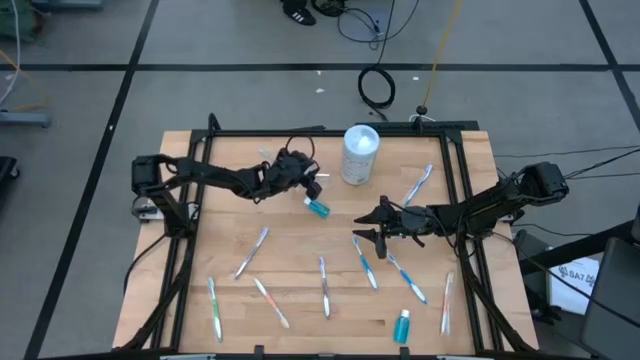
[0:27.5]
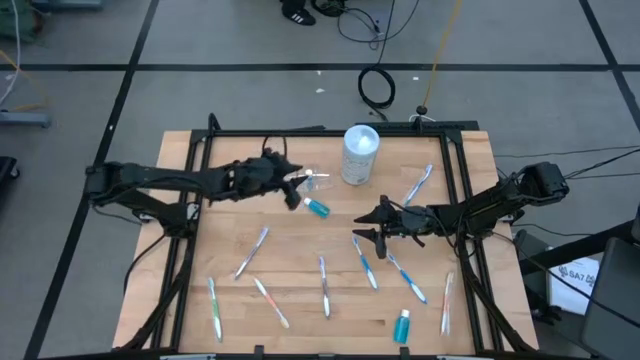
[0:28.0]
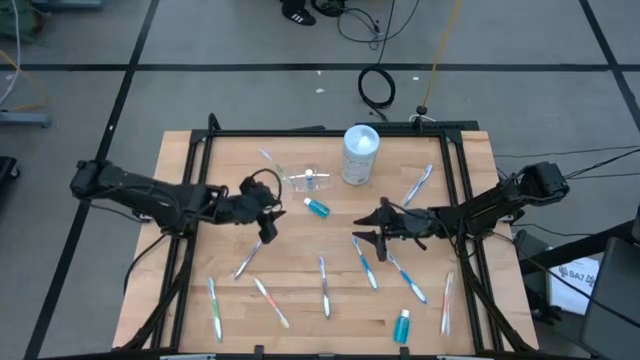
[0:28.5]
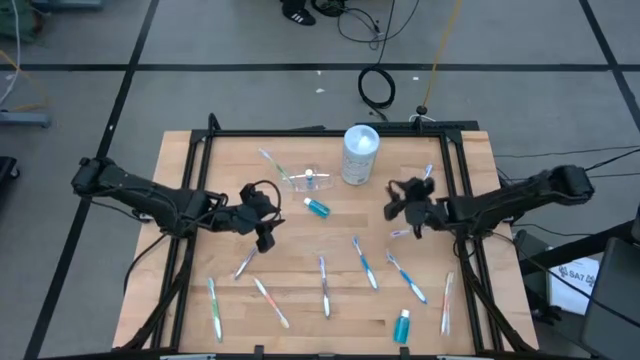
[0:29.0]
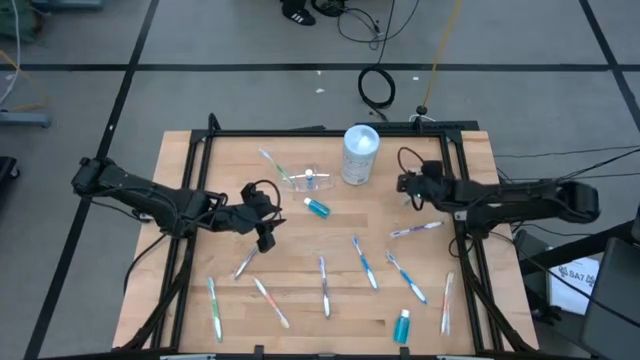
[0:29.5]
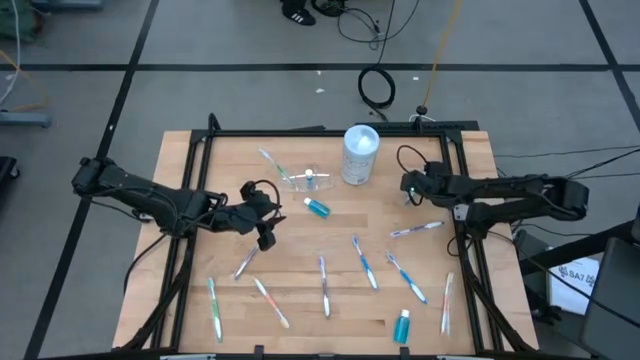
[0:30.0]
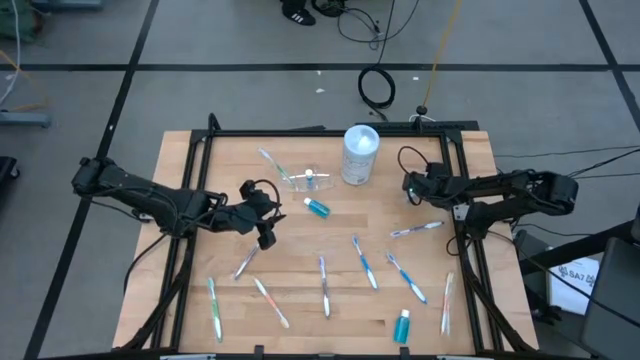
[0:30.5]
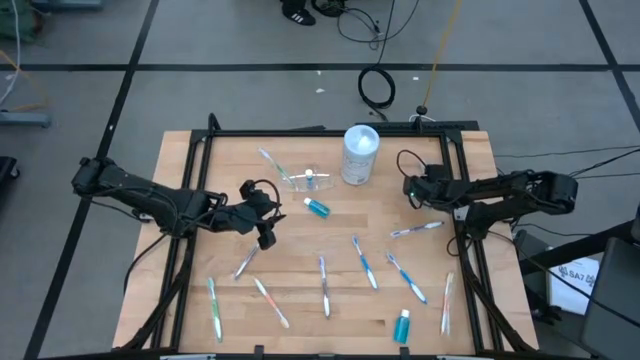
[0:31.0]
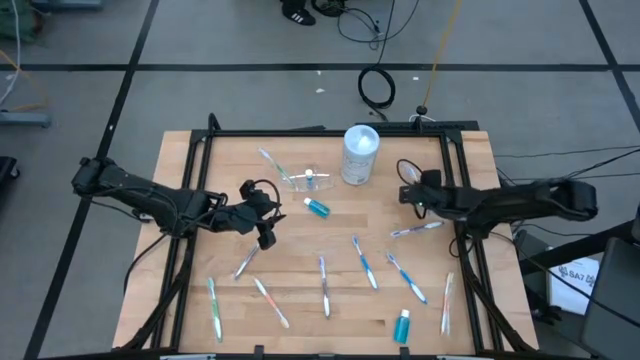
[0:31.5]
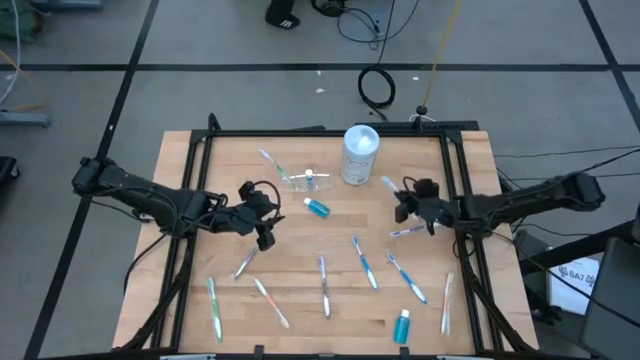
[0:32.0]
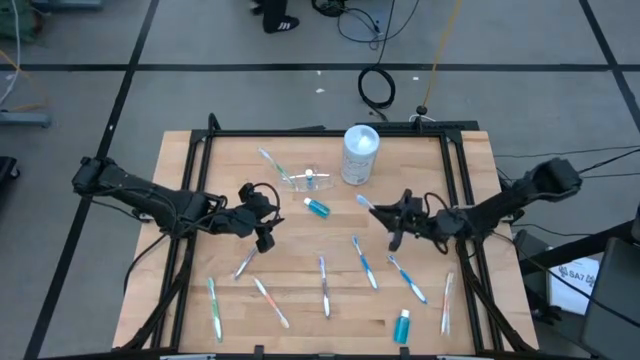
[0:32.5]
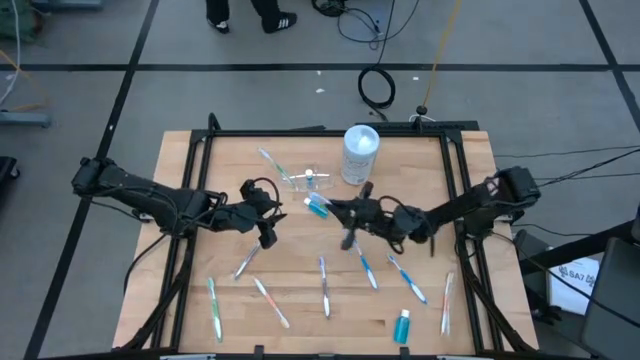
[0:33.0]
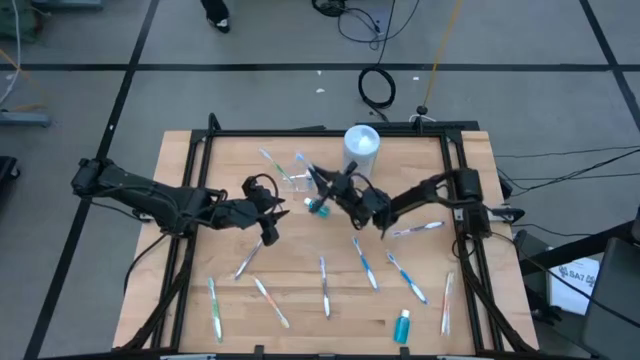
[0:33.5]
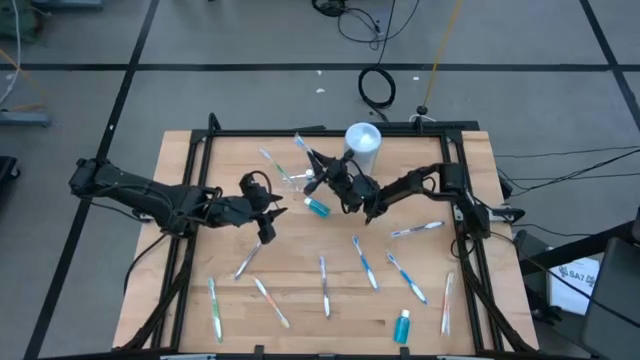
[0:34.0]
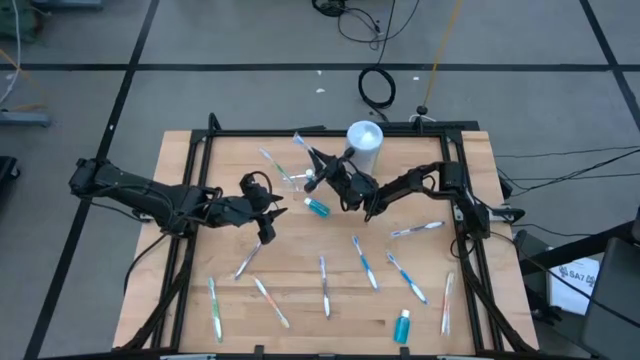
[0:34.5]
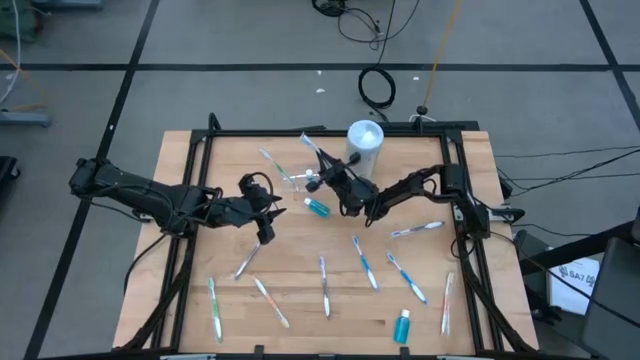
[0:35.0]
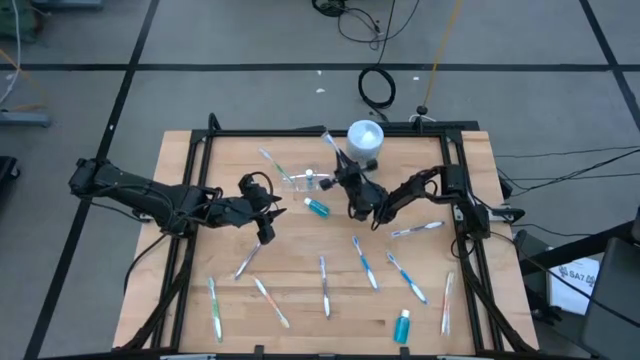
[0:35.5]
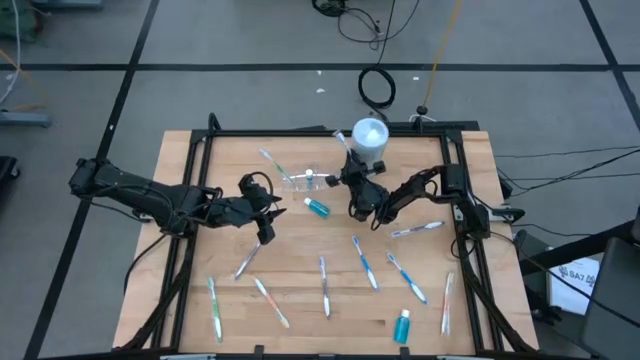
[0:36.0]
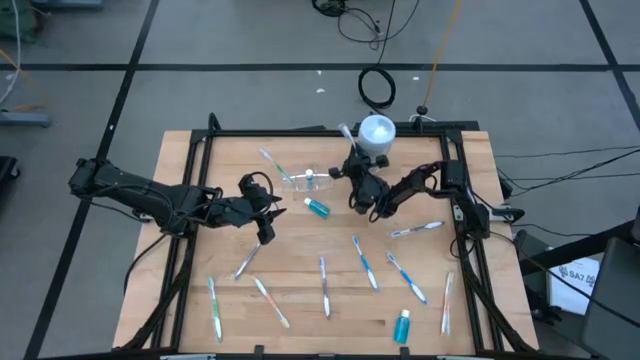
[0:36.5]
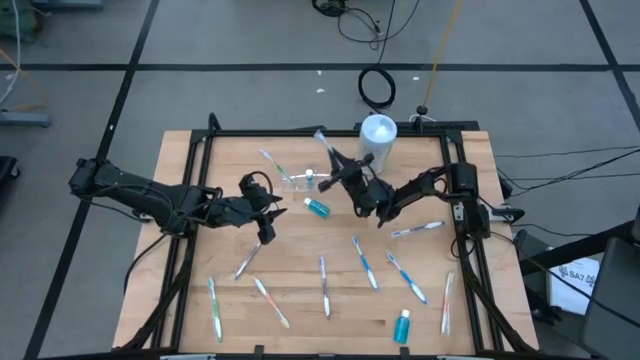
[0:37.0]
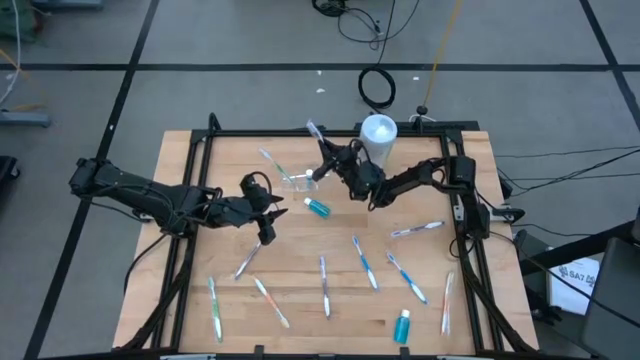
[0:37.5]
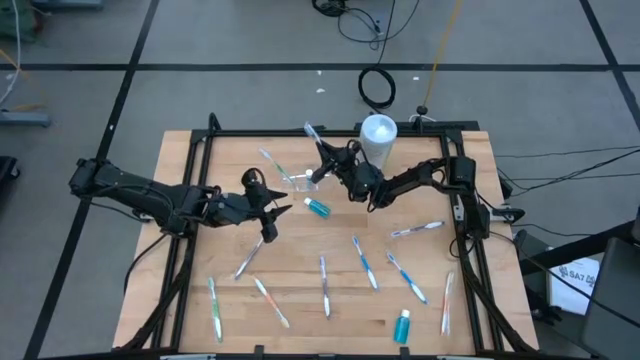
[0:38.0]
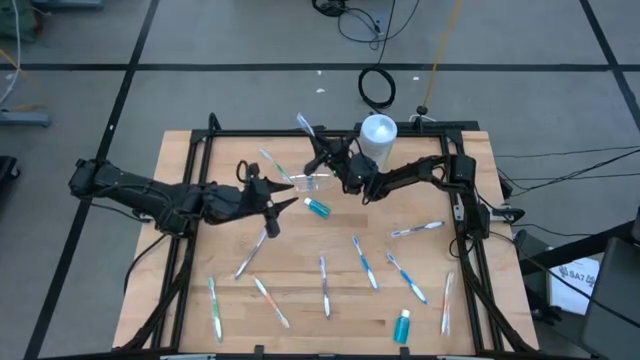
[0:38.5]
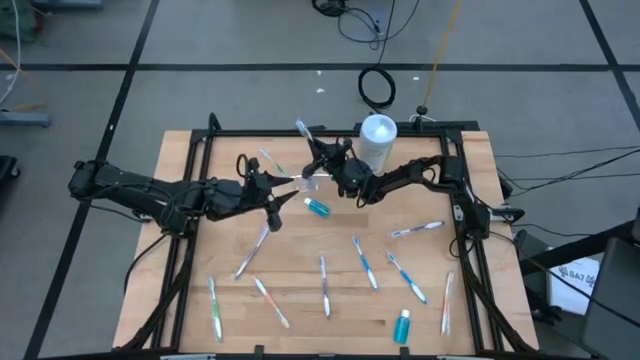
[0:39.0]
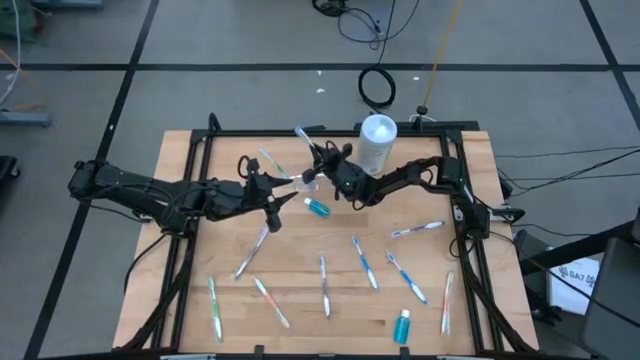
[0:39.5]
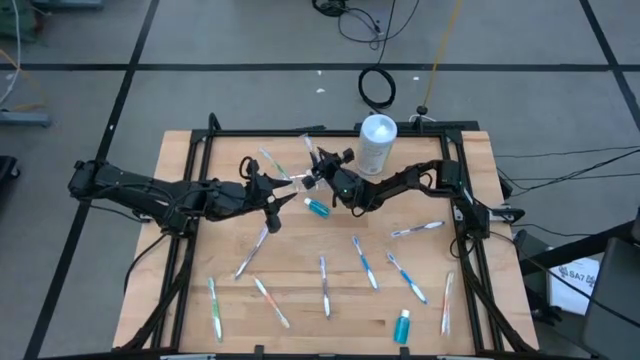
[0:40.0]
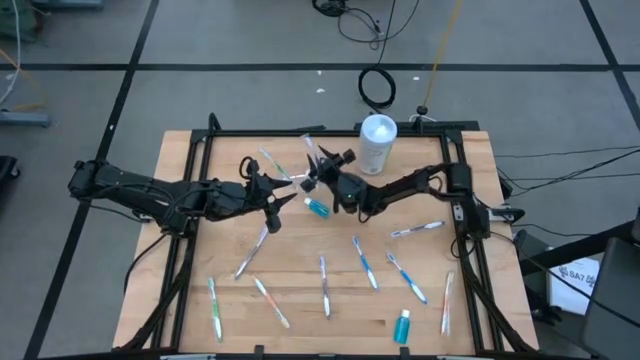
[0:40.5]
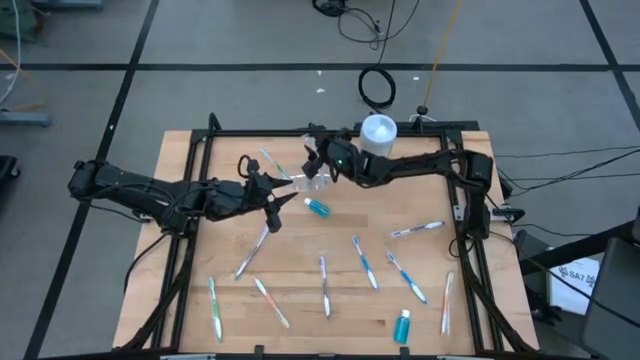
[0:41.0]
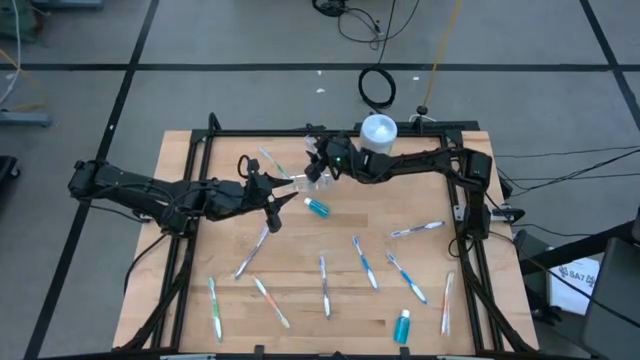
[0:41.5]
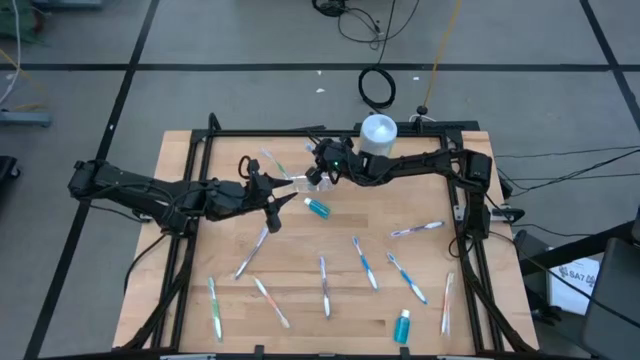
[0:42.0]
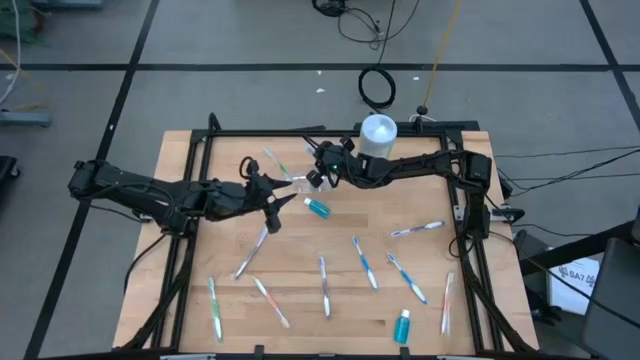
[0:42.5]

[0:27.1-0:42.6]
Task: Pick & Place toothbrushing station
Put the top blue toothbrush in the right compartment of the transparent organizer

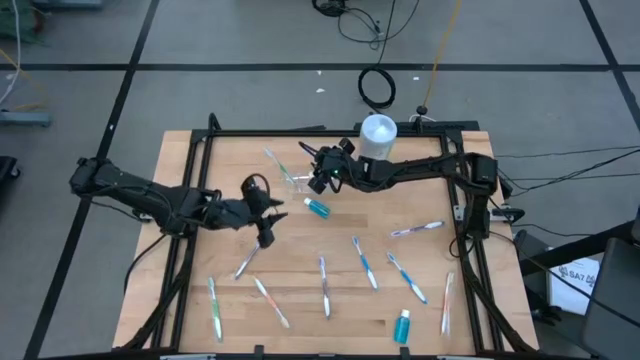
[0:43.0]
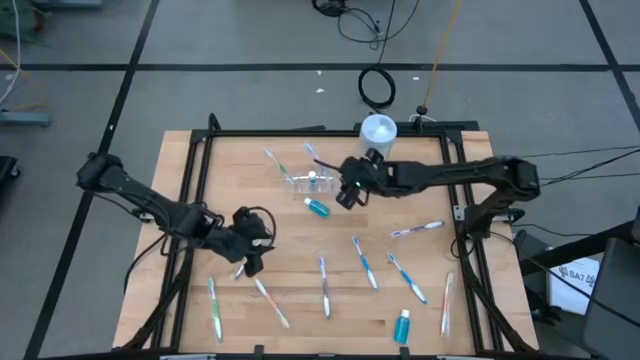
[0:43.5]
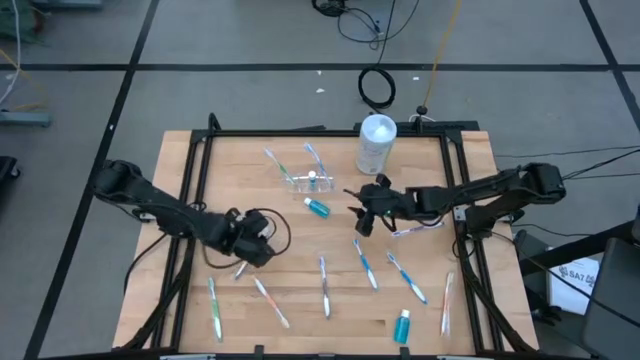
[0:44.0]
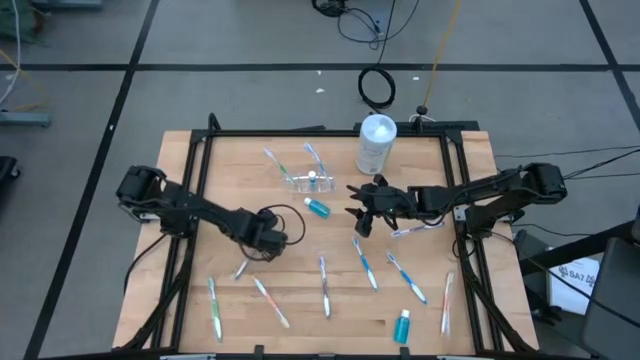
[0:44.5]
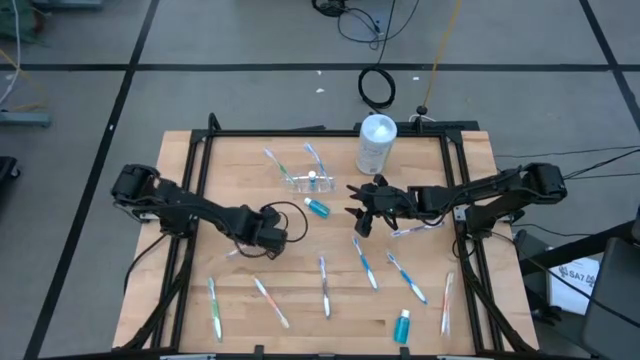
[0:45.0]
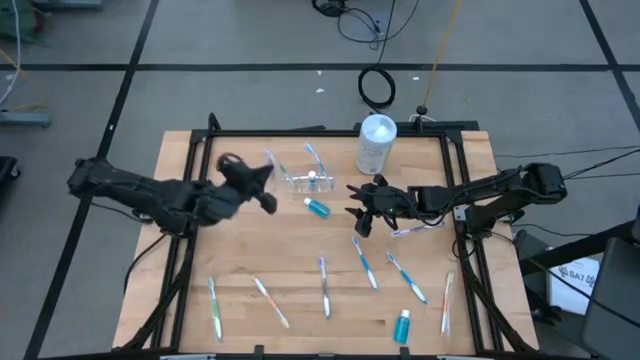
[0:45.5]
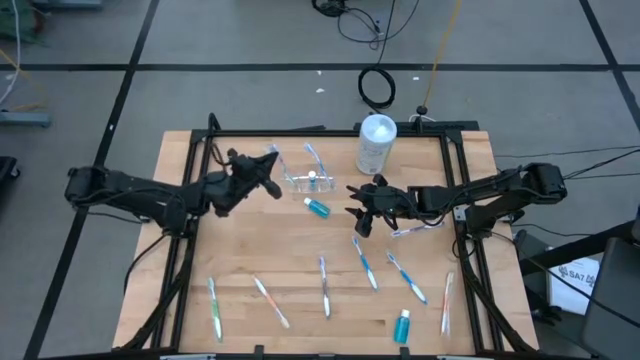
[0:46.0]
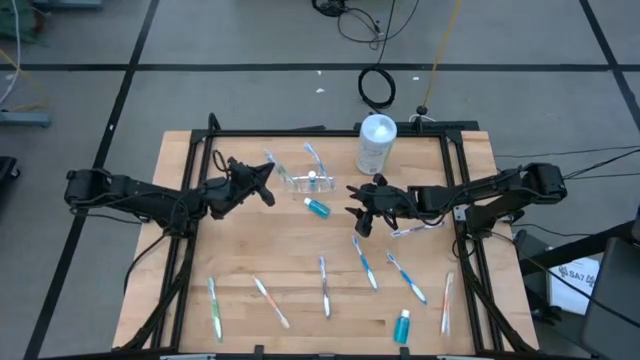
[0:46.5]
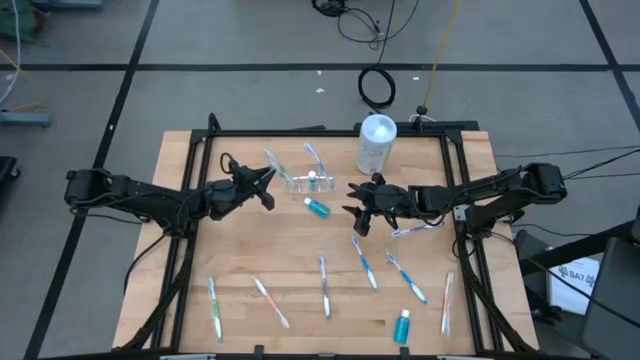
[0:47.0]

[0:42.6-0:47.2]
Put the left purple toothbrush in the left compartment of the transparent organizer

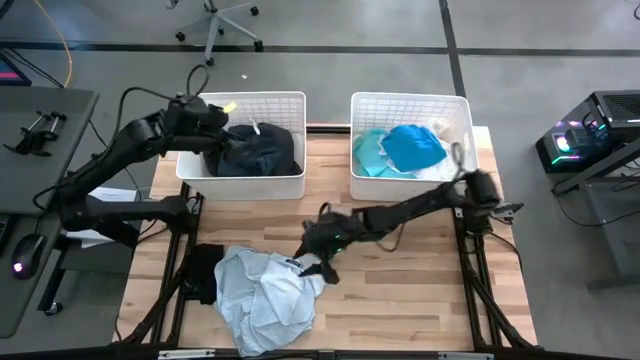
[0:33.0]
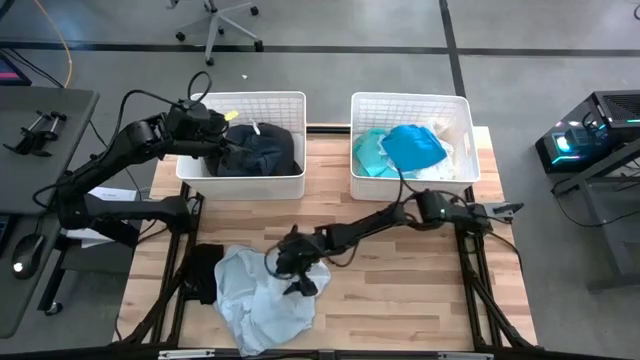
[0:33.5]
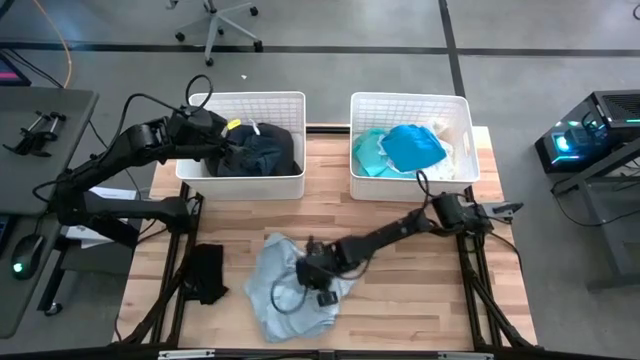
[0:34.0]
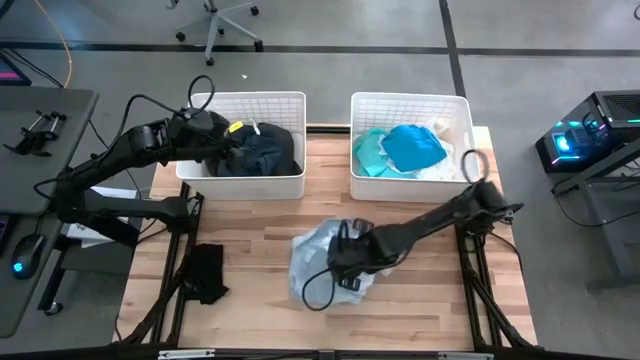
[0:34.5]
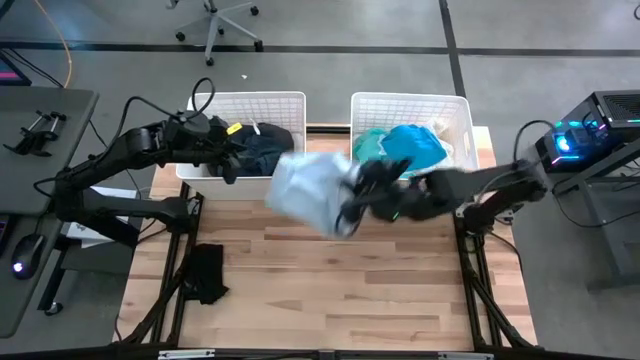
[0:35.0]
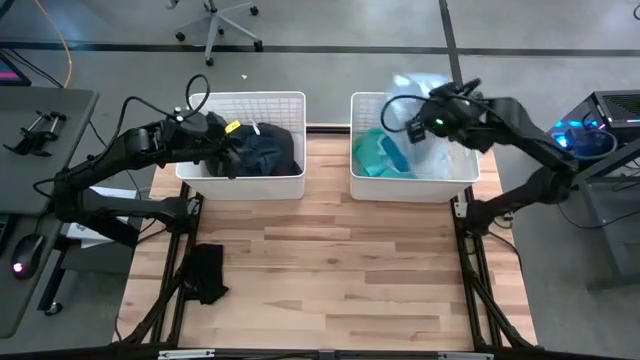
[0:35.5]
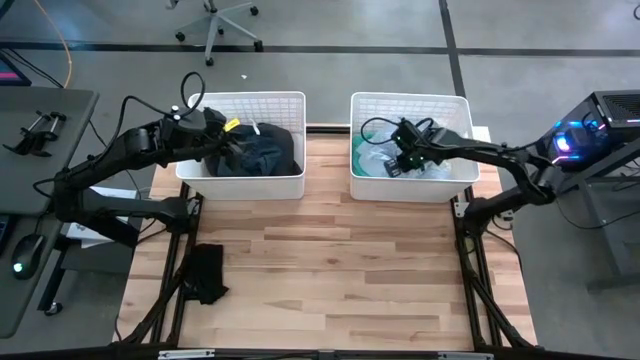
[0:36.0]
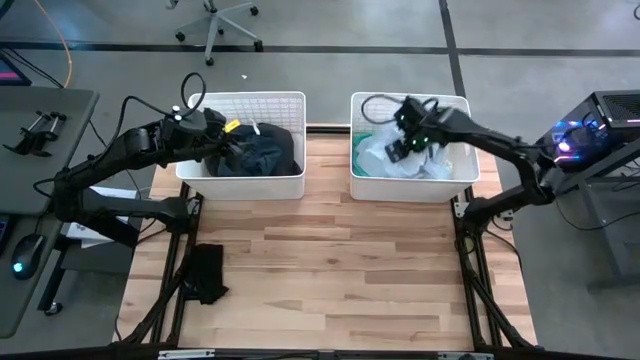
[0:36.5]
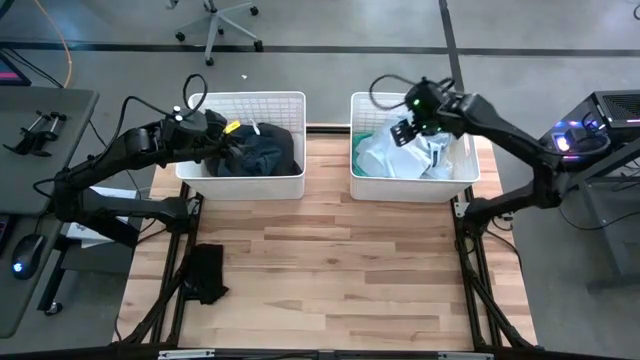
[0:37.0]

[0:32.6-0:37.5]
Task: Sort clothes
Put the blue patient gown into the right white bin
